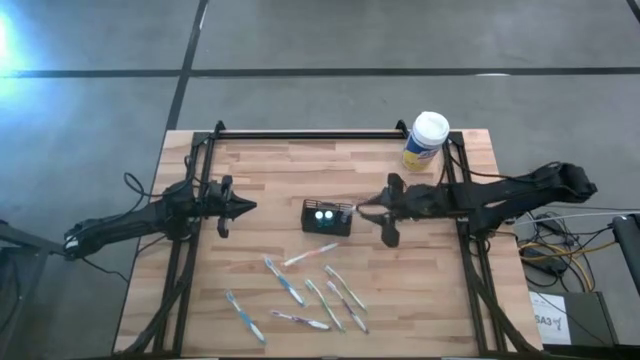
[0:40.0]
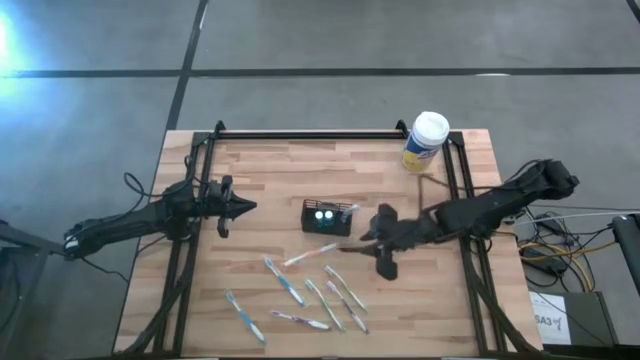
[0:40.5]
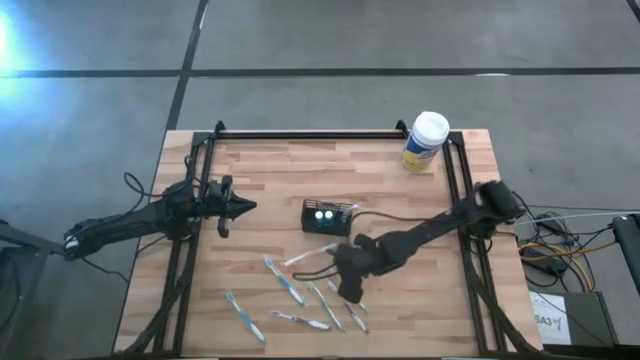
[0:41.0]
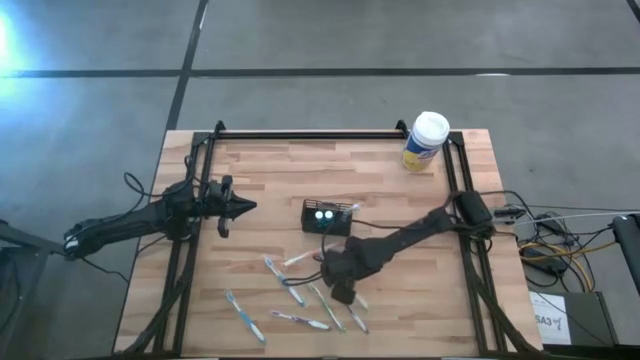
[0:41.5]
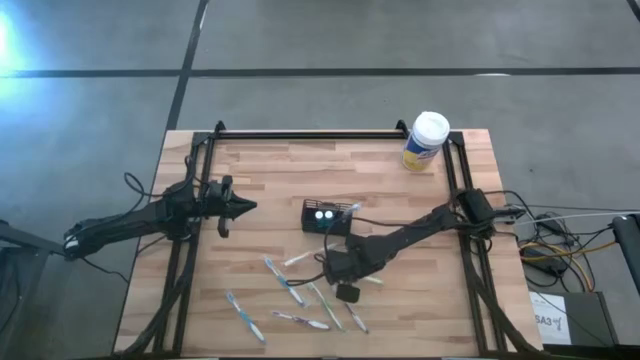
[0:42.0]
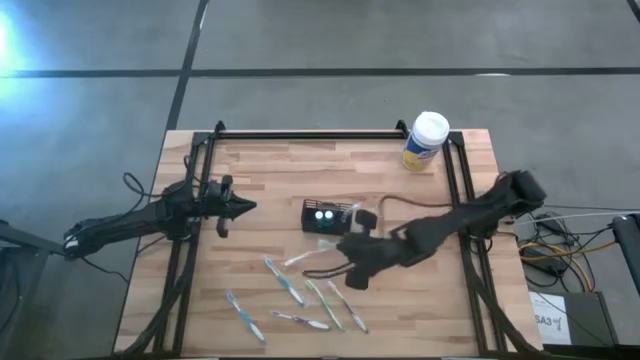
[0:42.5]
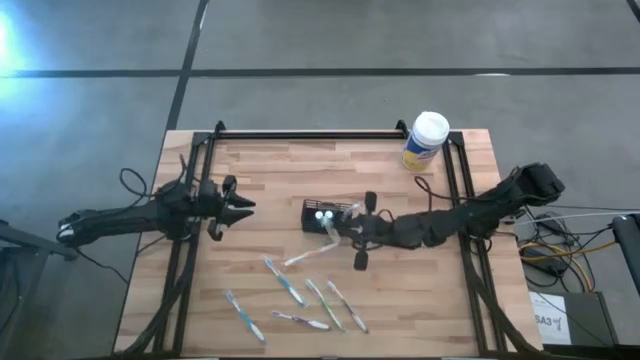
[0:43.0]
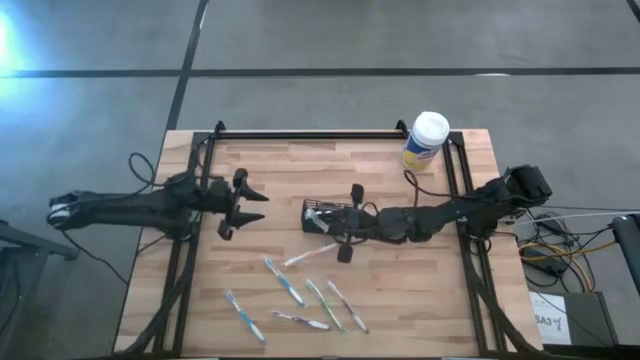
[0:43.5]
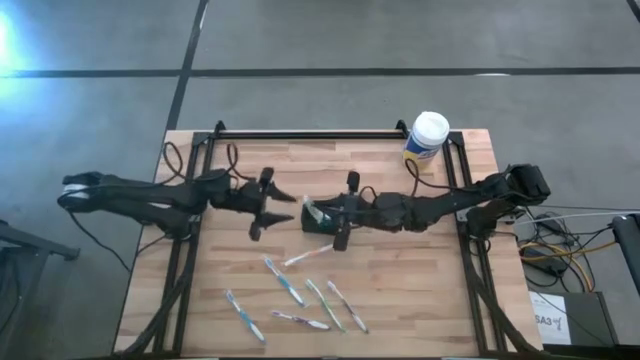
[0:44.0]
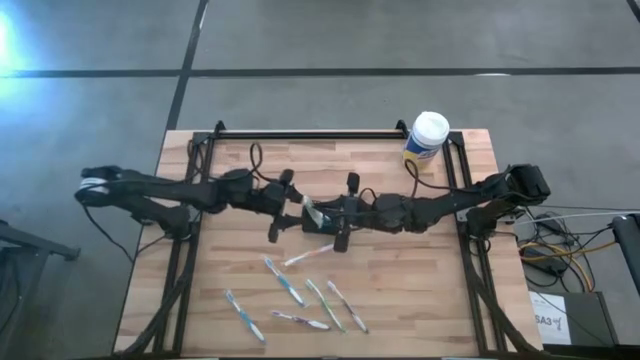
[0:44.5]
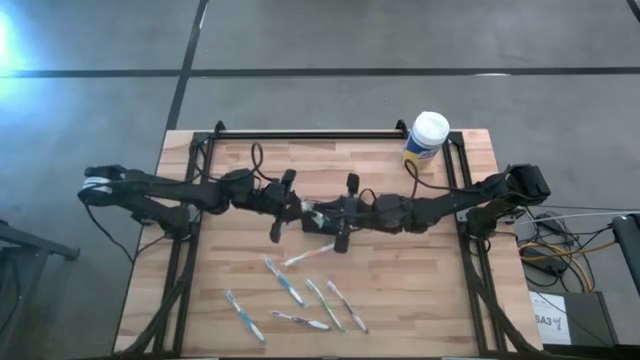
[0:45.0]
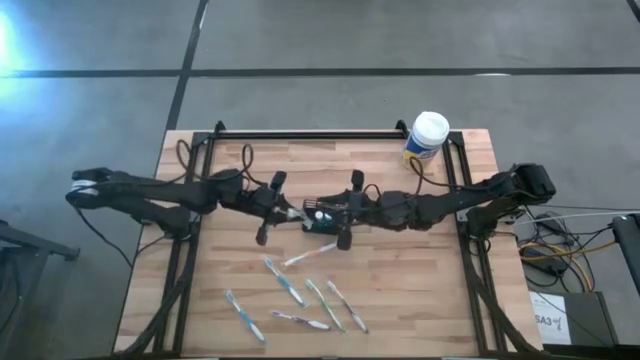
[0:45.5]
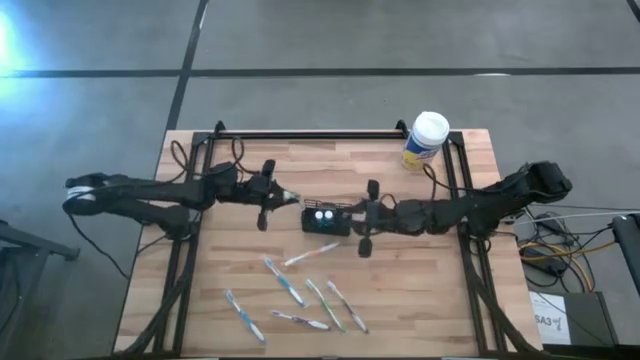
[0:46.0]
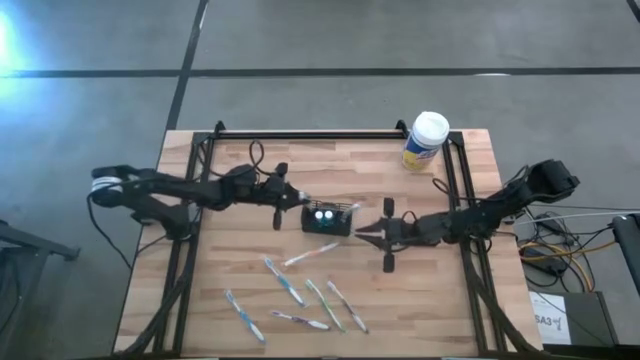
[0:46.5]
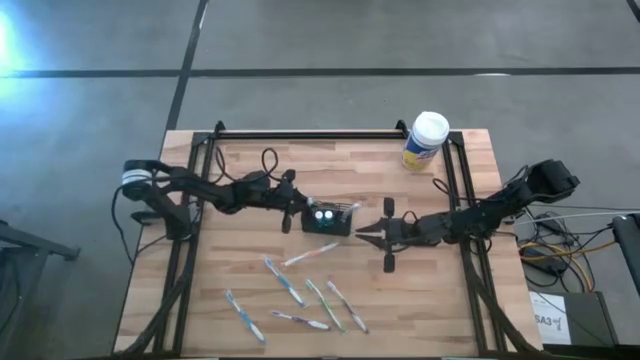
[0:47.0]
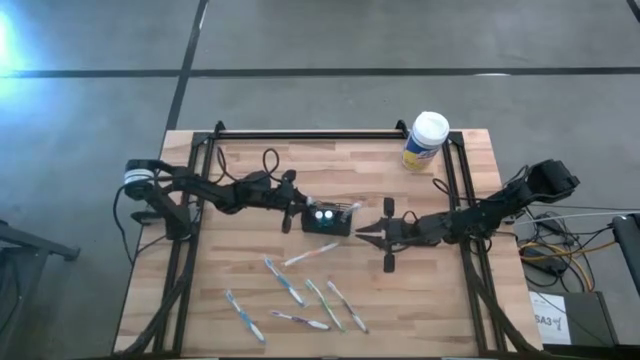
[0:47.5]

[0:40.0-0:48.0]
Task: Pick & Place toothbrushing station
Put the right green toothbrush into the black mesh organizer

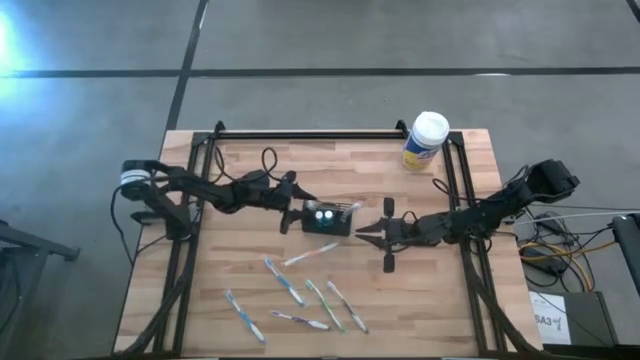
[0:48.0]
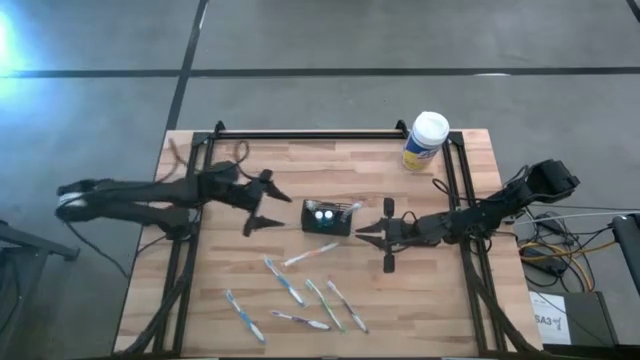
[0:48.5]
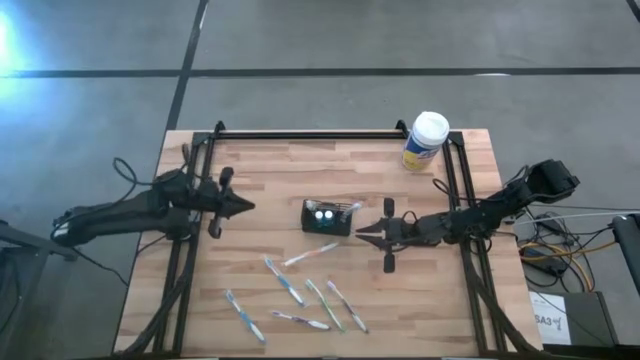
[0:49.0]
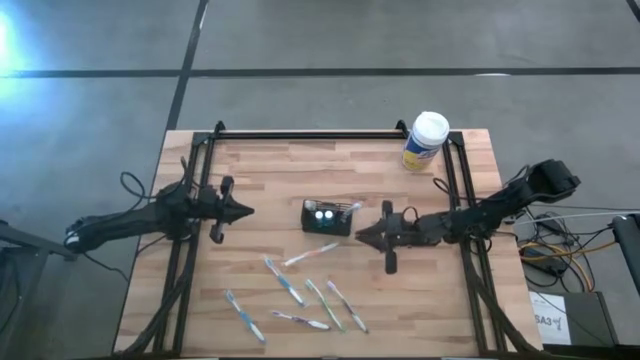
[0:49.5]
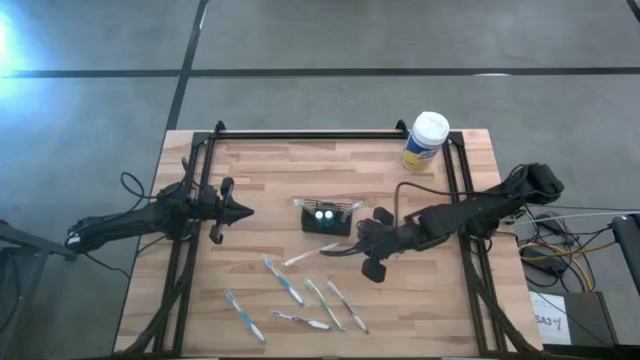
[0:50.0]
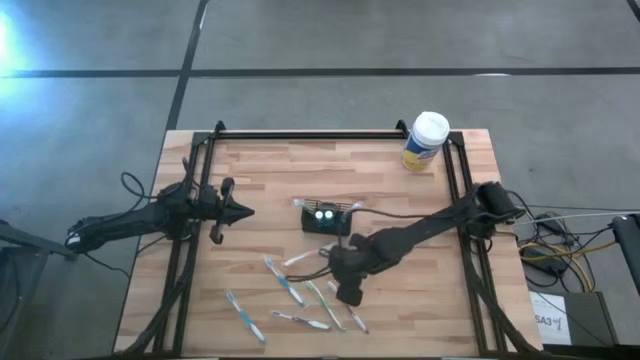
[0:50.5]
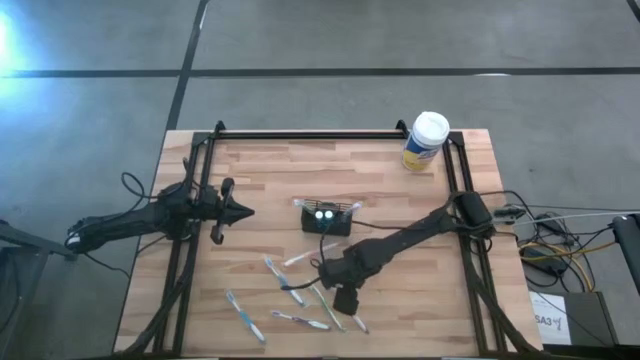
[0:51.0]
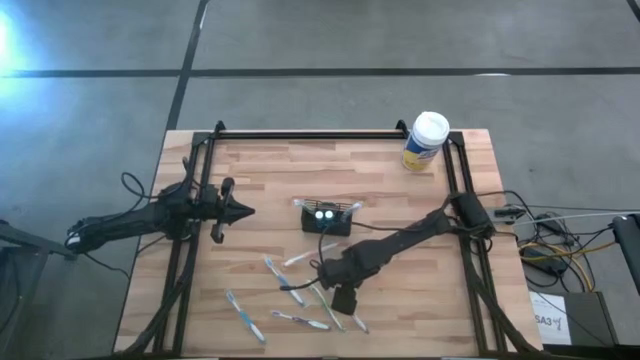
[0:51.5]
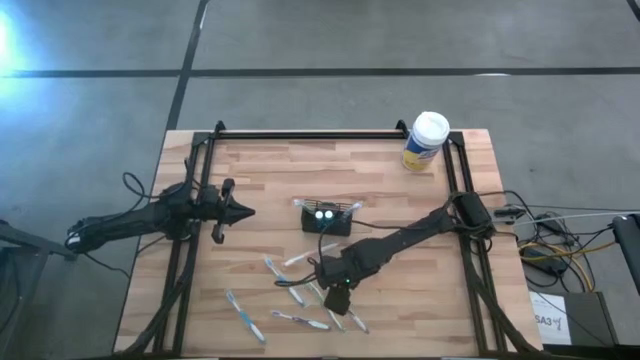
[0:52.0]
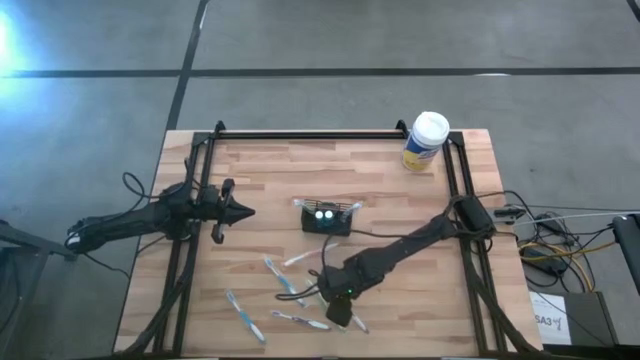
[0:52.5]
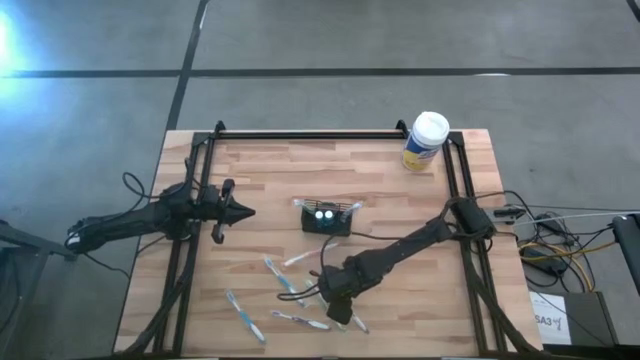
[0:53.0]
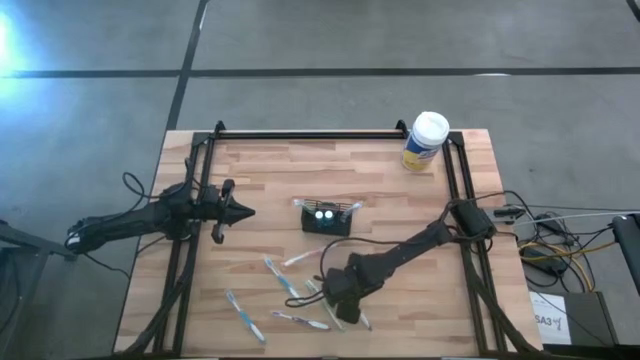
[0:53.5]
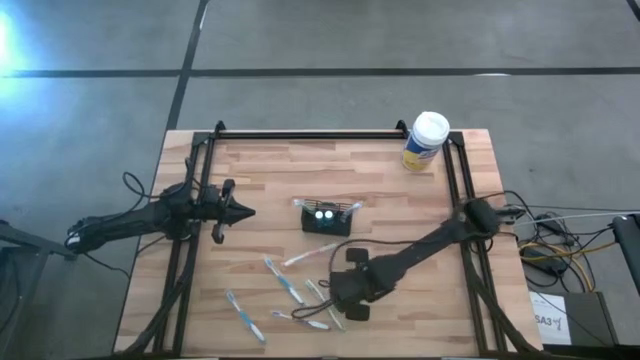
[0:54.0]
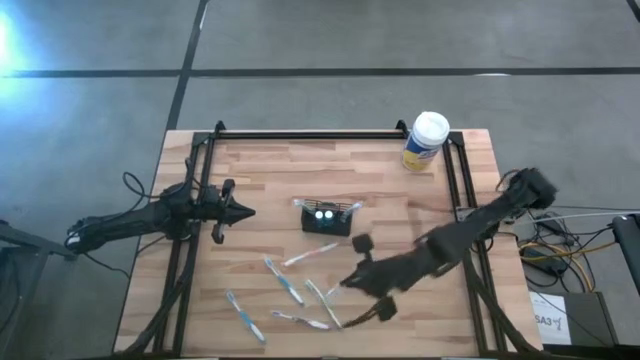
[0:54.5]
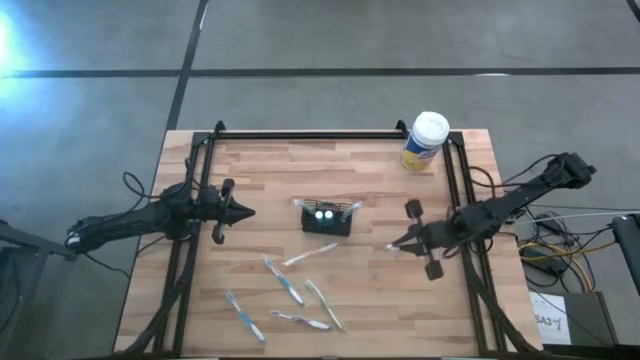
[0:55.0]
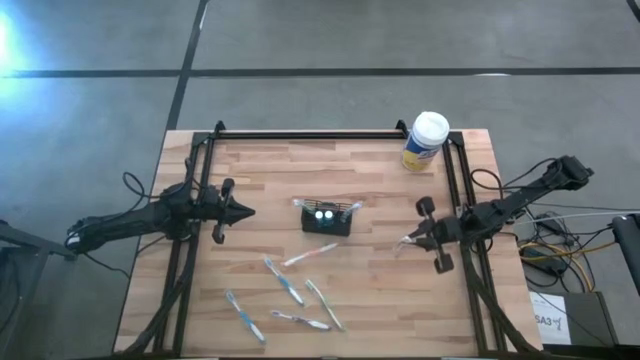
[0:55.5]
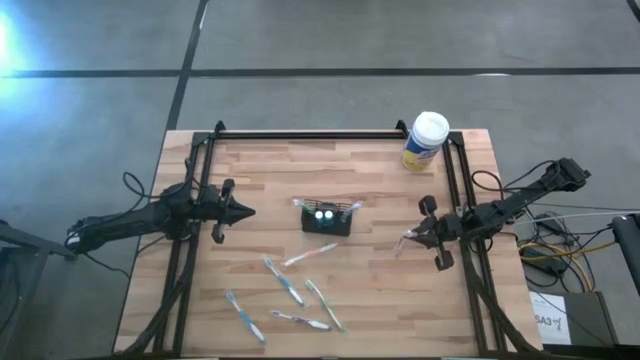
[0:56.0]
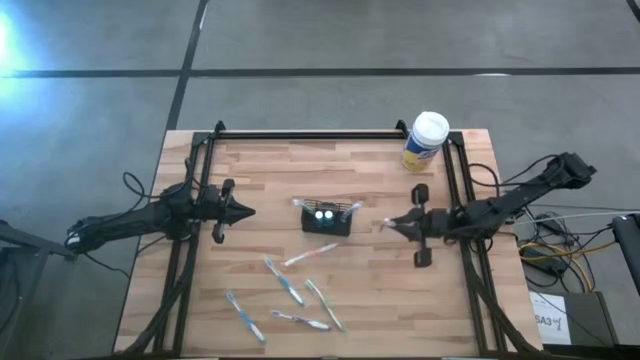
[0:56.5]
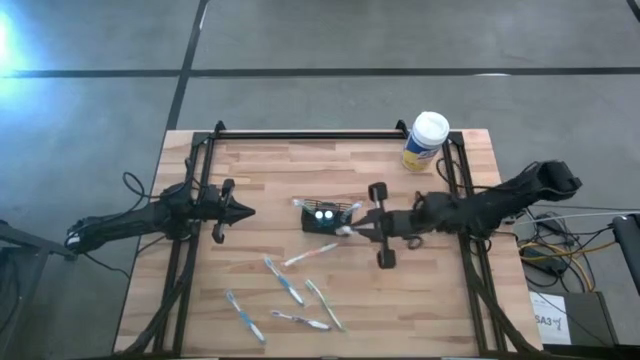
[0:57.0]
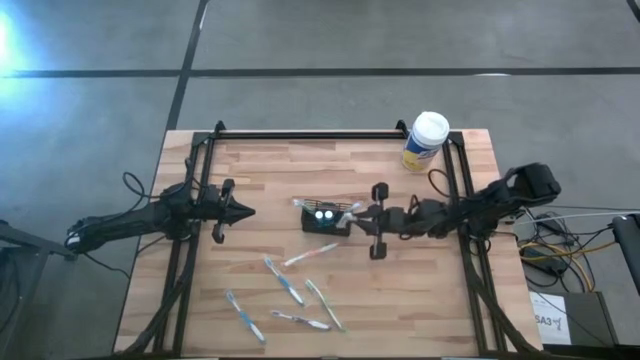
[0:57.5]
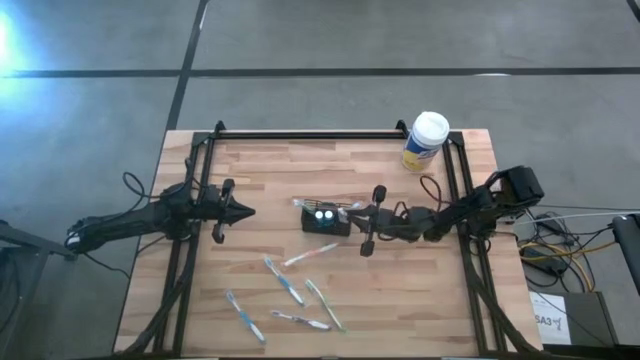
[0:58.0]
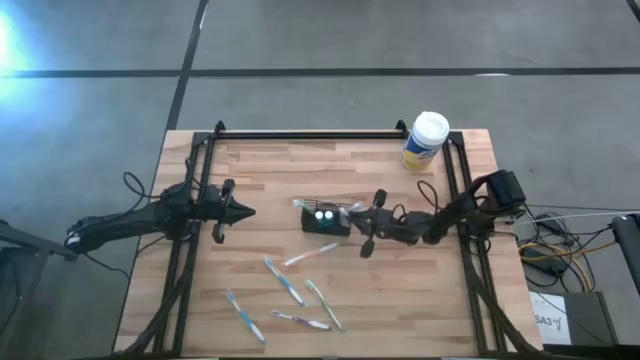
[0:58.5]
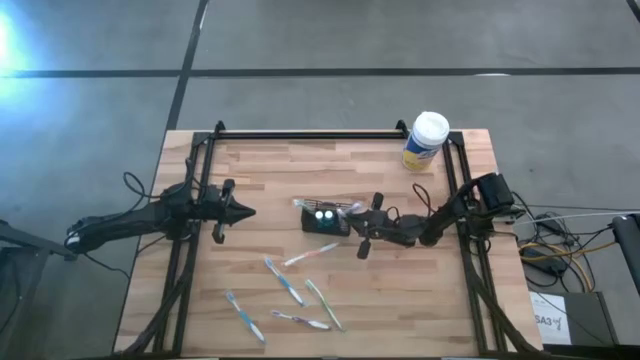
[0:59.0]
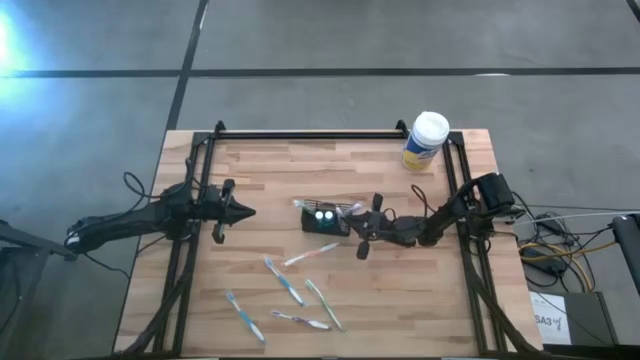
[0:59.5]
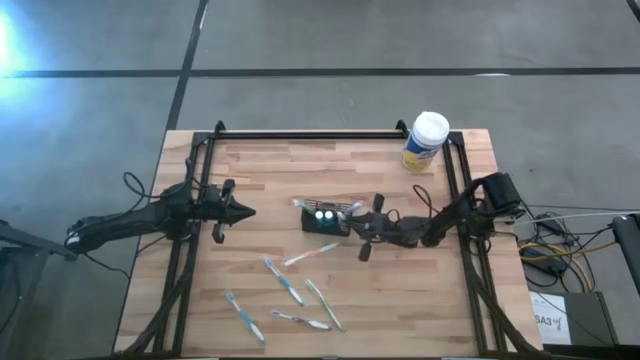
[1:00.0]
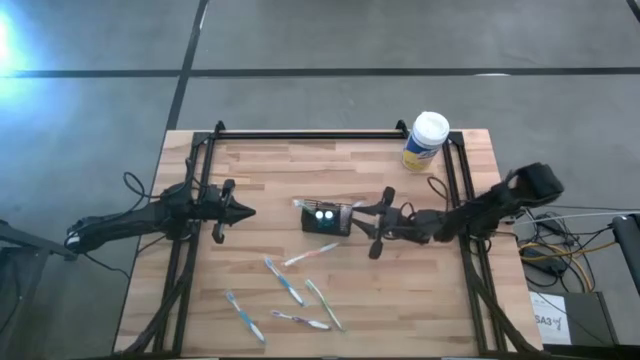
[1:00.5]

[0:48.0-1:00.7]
Put the right violet toothbrush into the black mesh organizer
